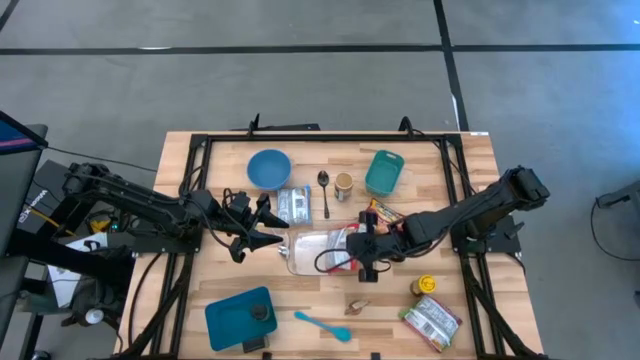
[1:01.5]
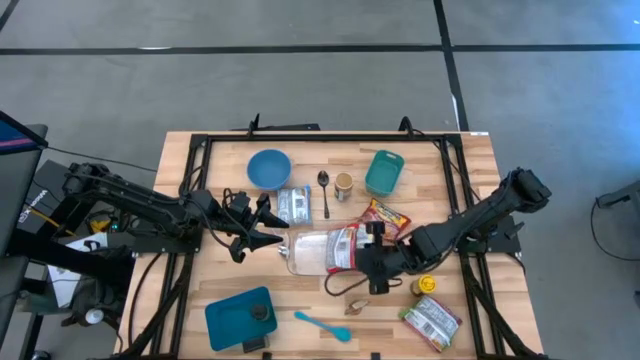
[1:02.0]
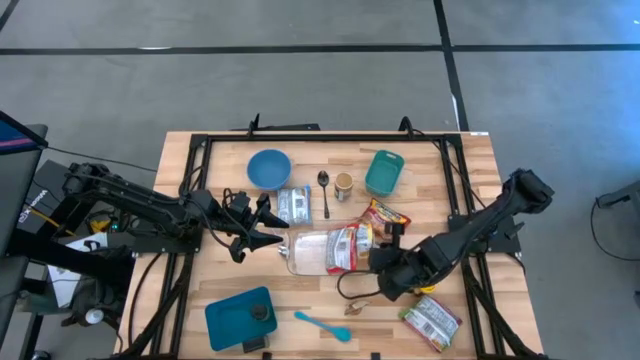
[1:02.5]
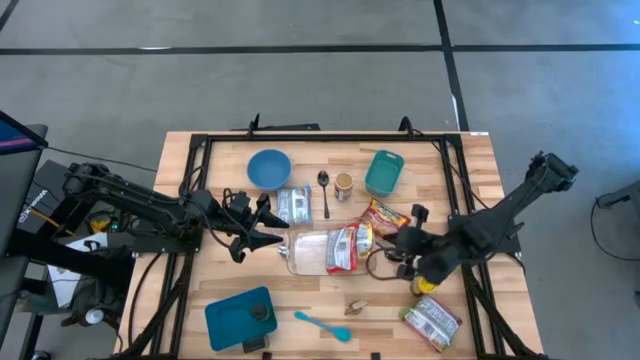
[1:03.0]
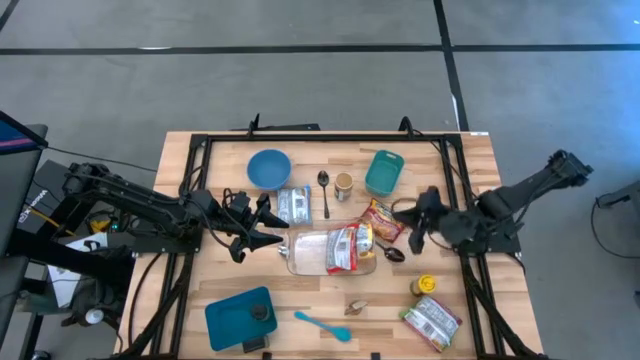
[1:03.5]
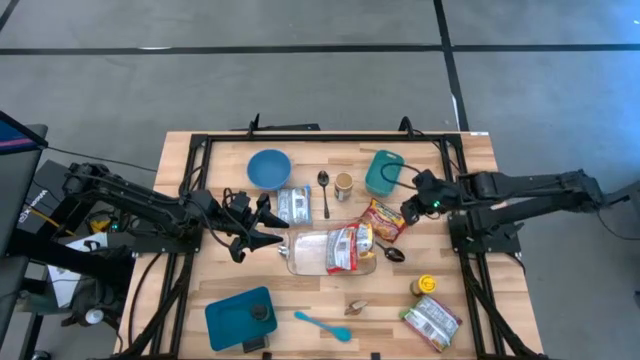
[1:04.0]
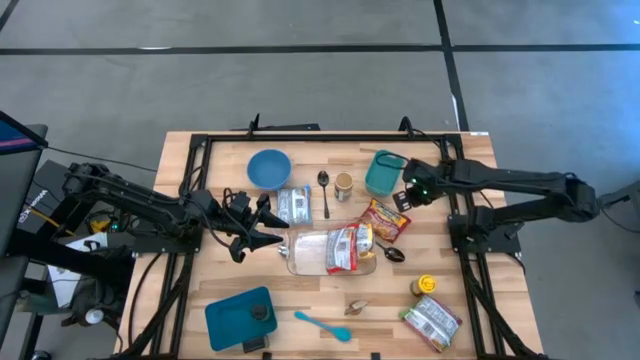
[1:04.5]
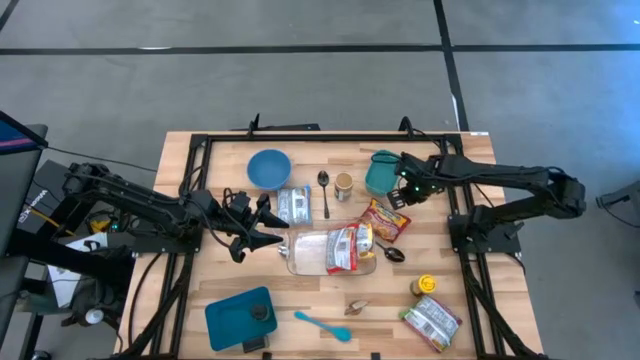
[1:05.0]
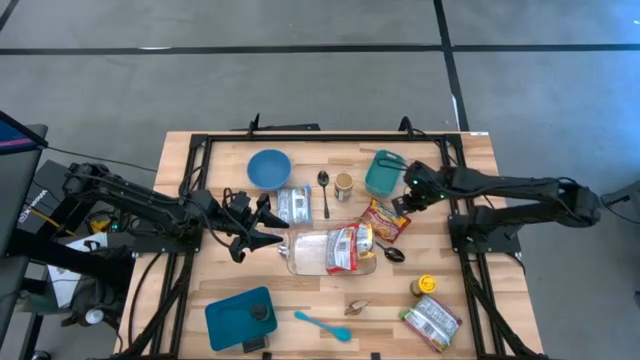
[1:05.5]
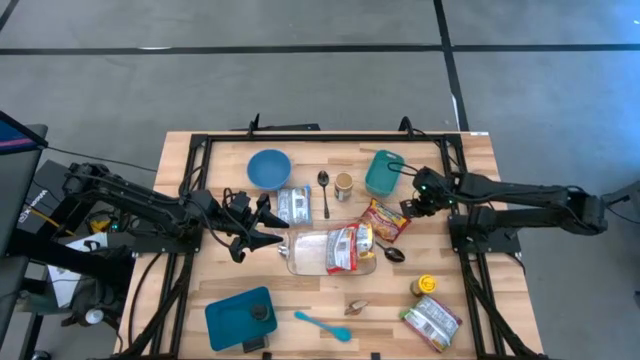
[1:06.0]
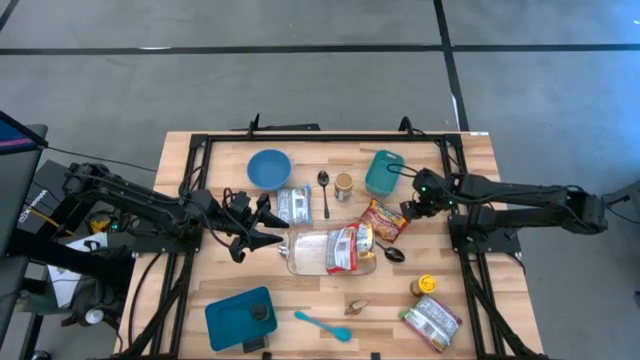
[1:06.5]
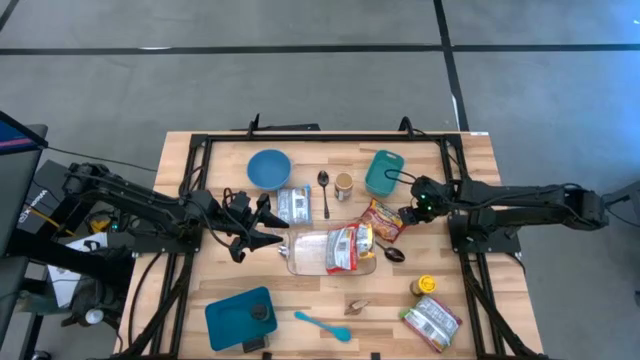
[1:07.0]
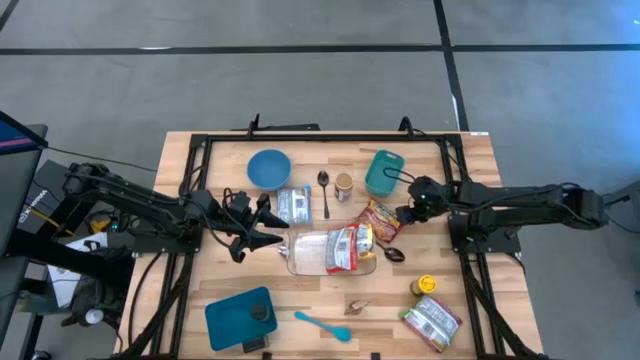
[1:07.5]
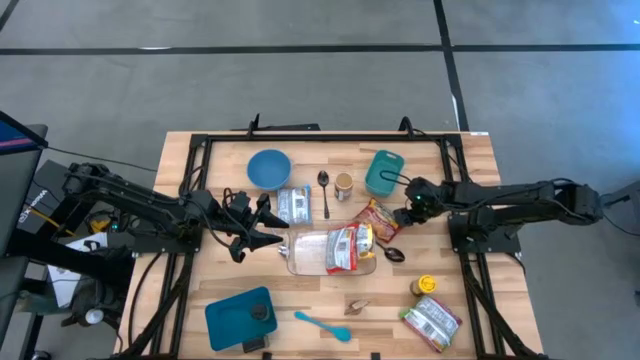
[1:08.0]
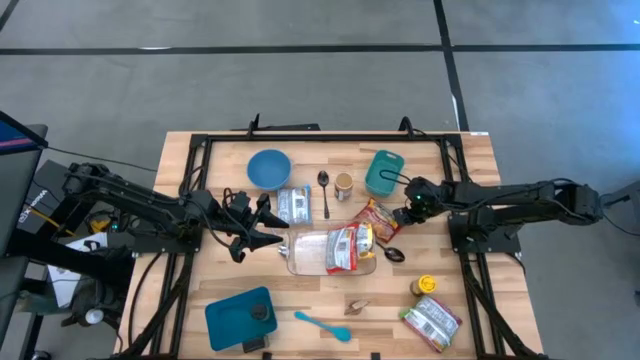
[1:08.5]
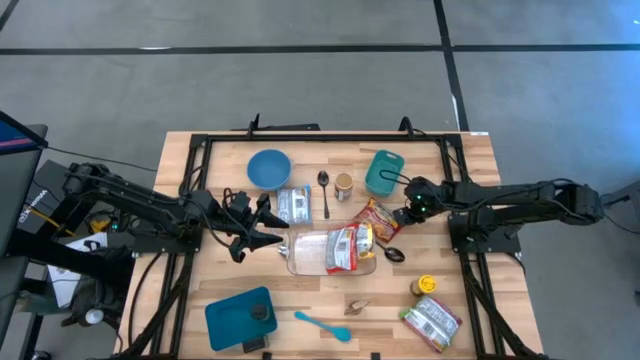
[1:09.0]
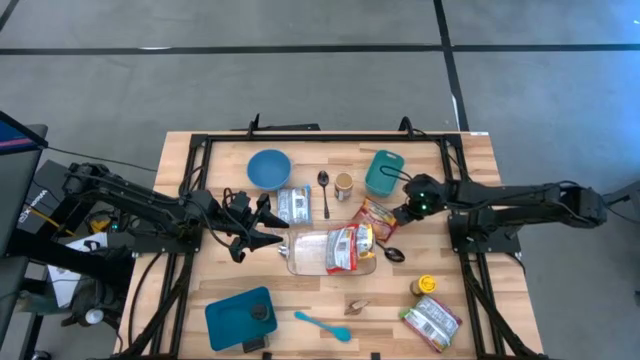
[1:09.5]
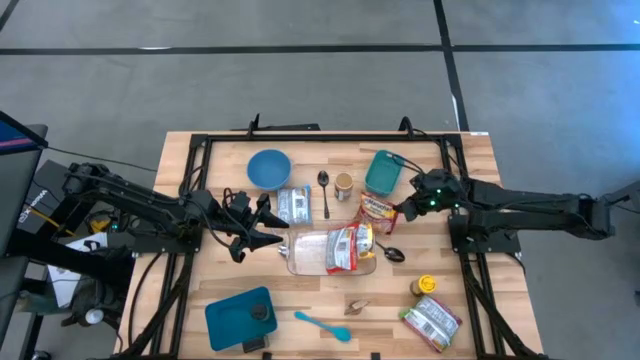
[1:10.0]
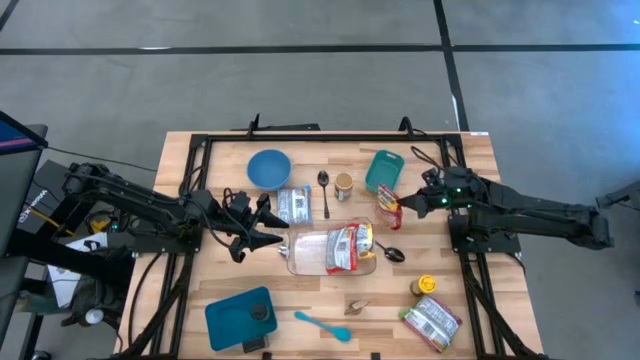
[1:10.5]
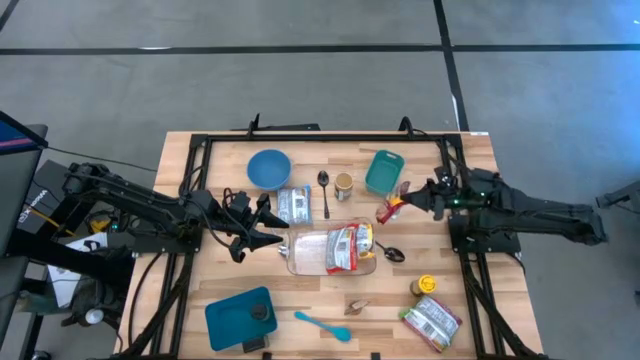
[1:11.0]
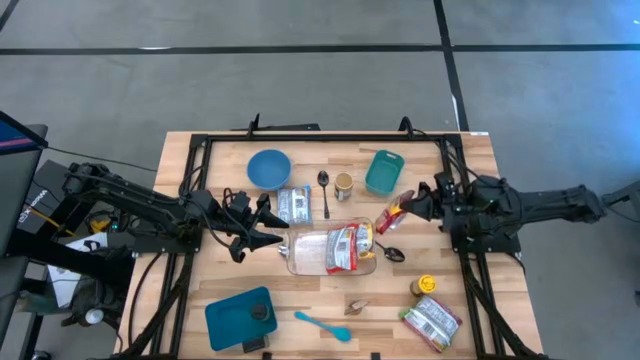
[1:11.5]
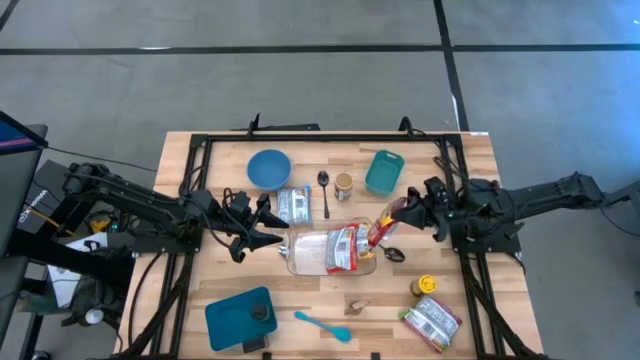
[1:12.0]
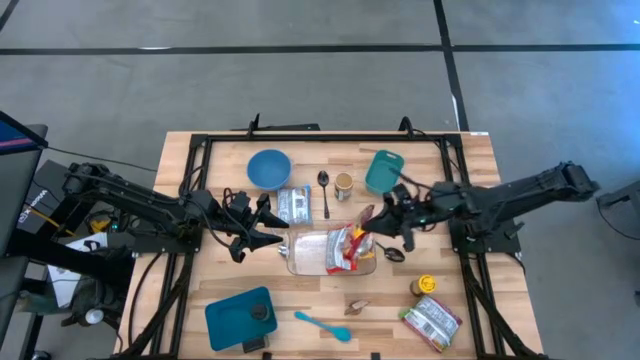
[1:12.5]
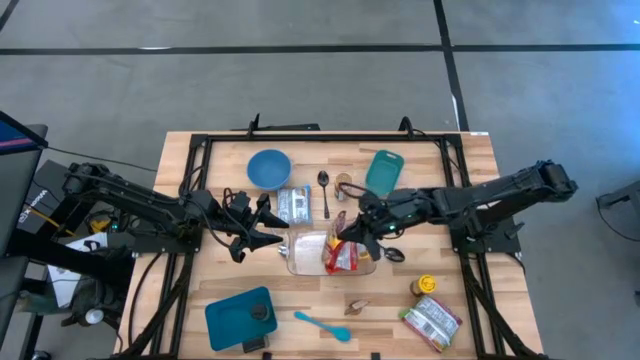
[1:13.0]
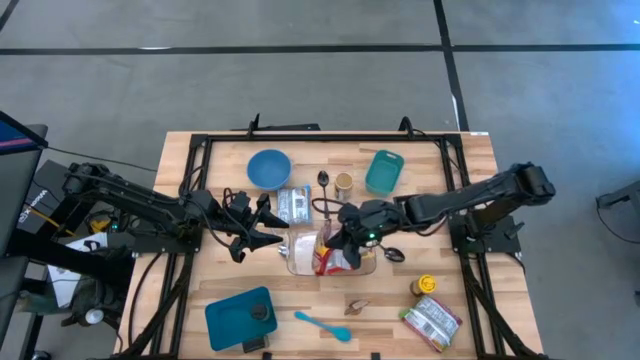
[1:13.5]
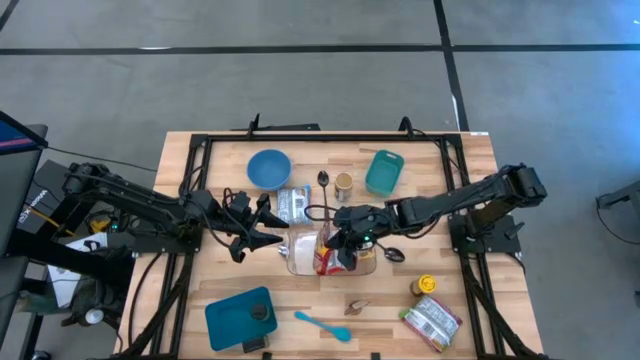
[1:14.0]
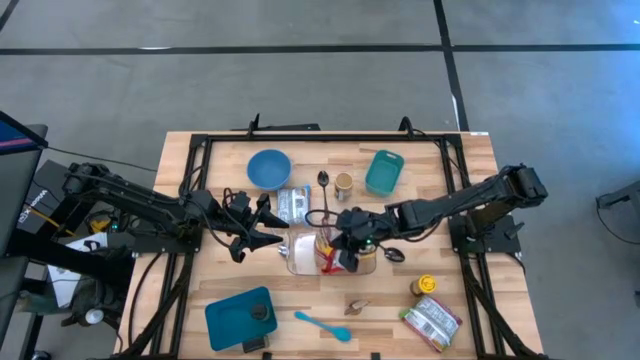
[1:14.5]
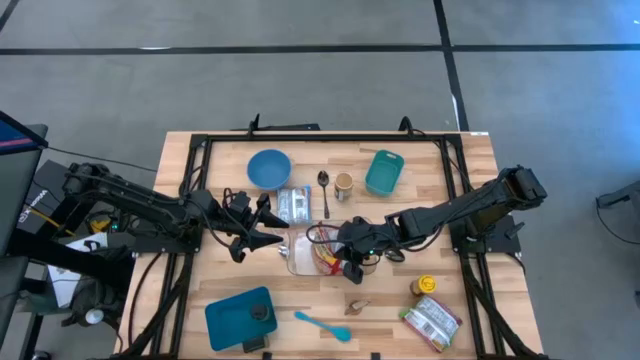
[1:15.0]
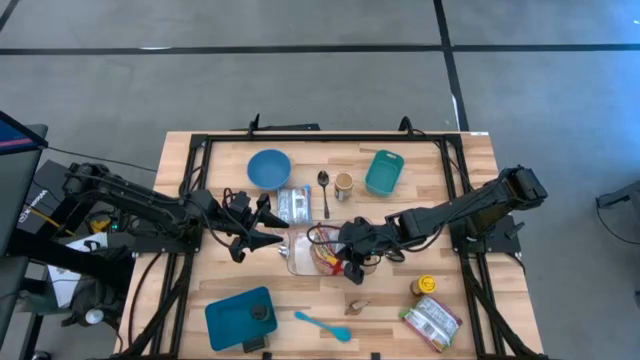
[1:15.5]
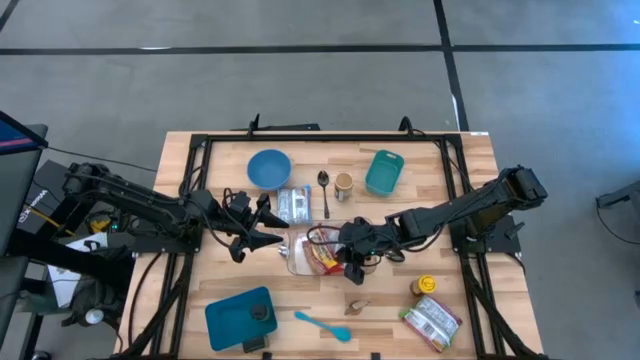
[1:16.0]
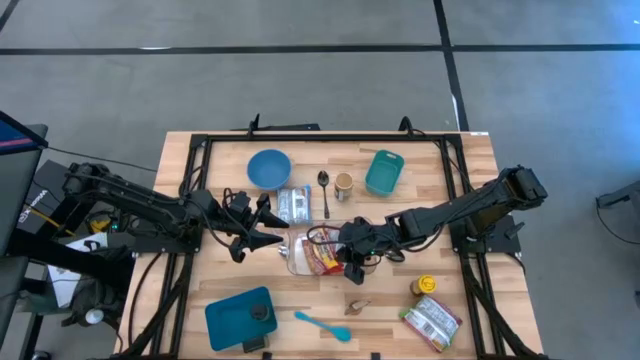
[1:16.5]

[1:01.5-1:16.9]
Task: Pick & Place Food Item
Put the red noodle pack into the transparent bin

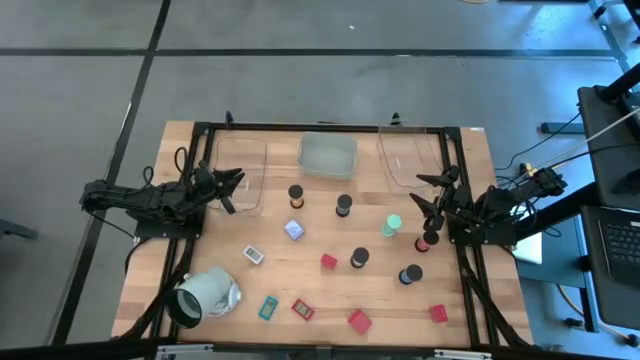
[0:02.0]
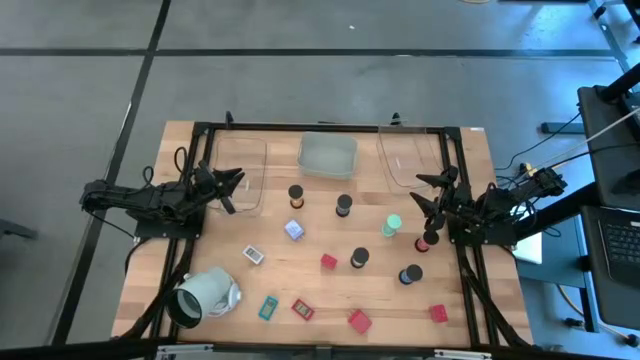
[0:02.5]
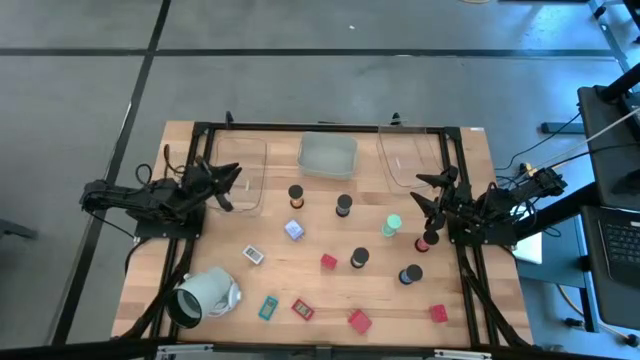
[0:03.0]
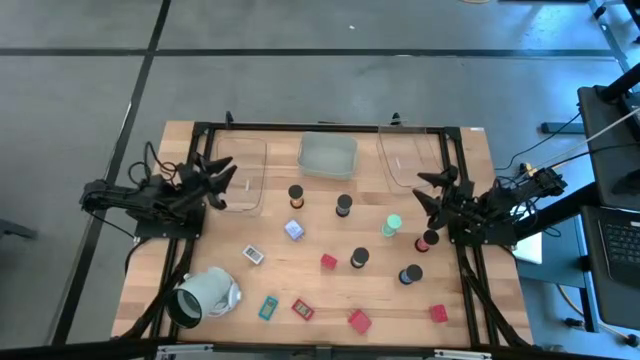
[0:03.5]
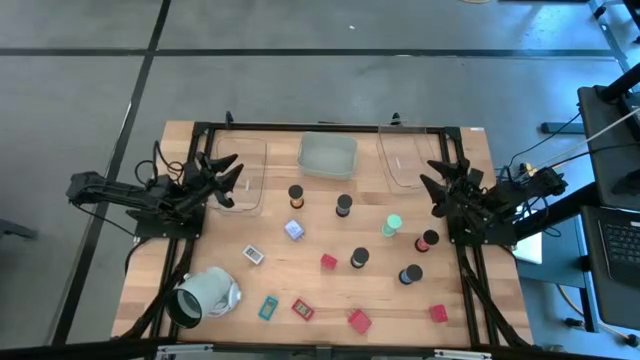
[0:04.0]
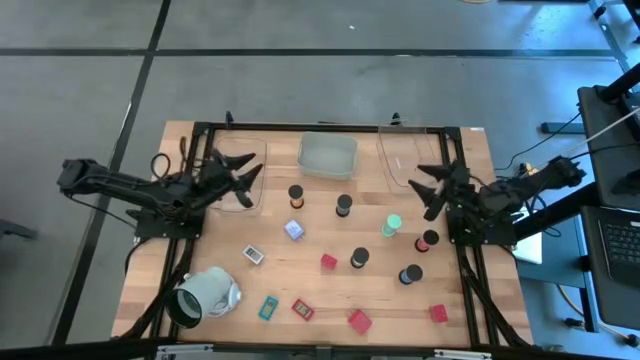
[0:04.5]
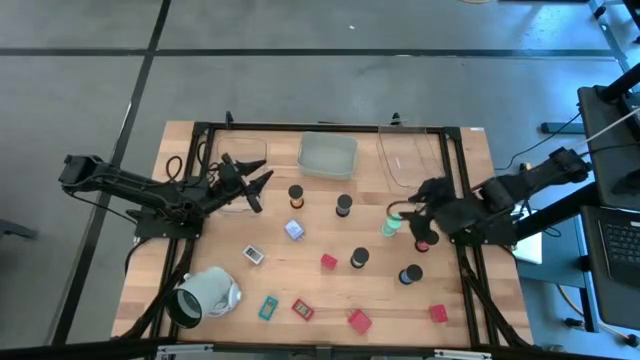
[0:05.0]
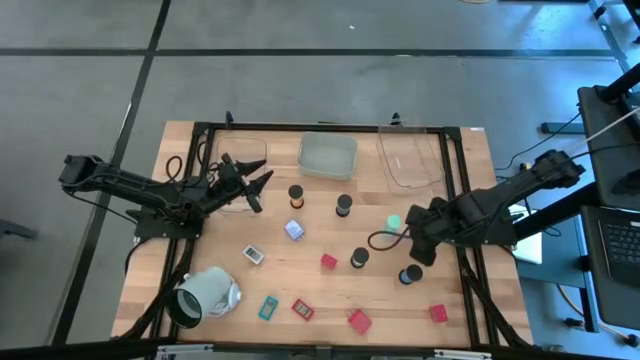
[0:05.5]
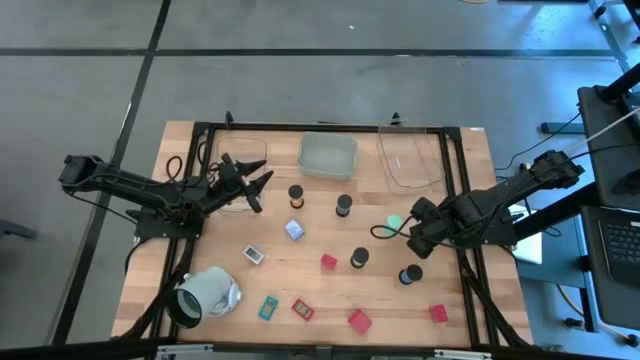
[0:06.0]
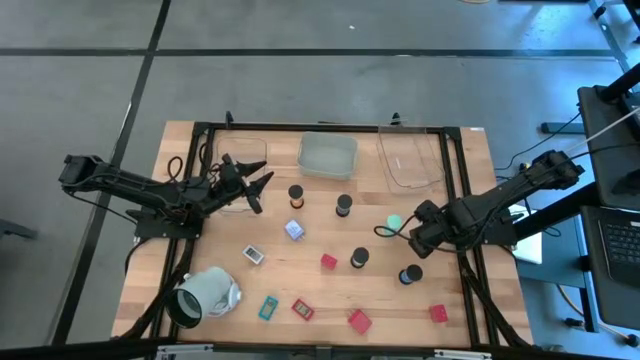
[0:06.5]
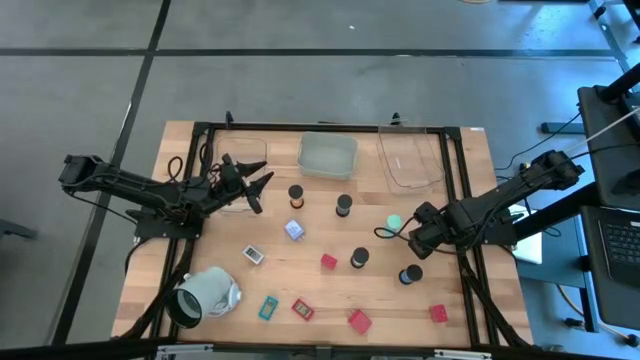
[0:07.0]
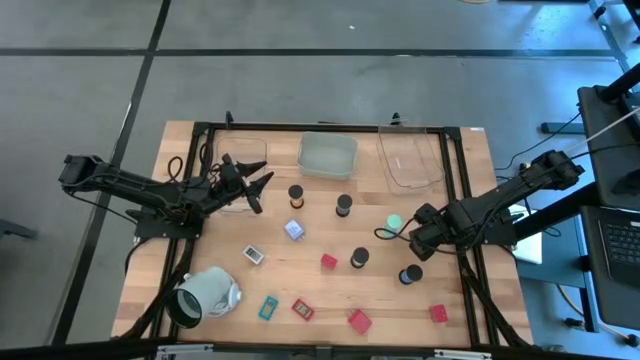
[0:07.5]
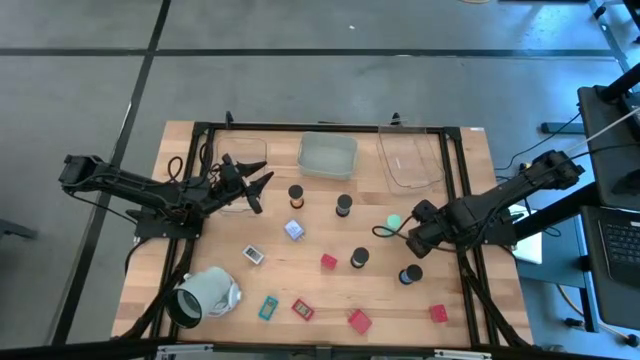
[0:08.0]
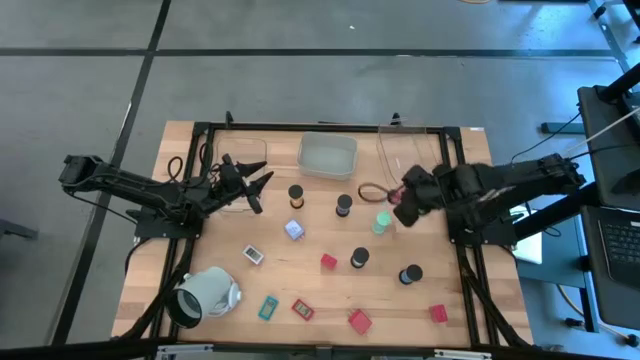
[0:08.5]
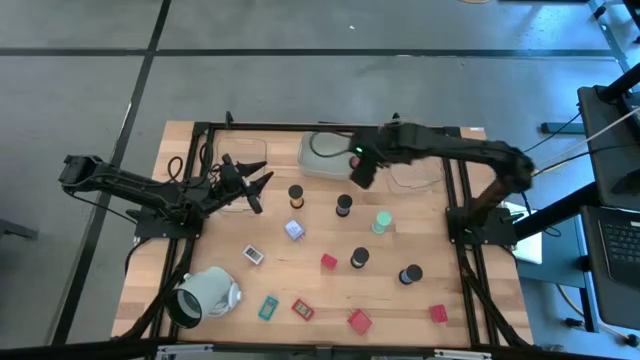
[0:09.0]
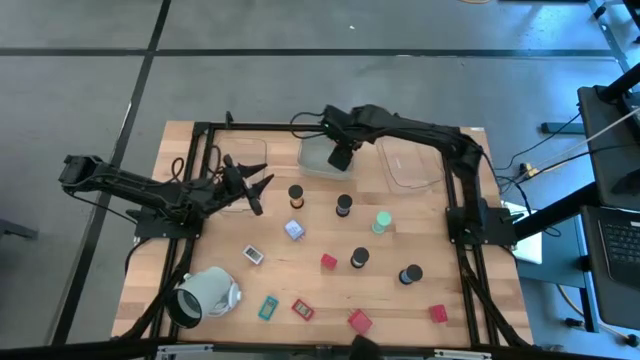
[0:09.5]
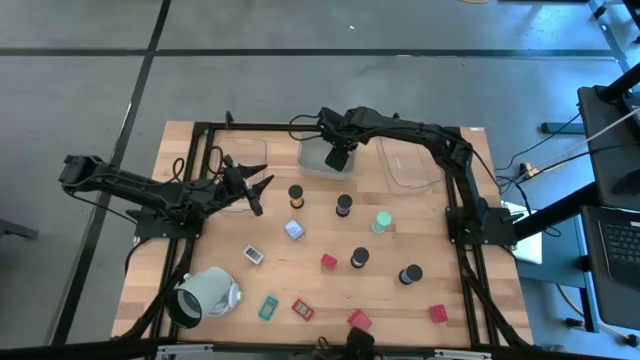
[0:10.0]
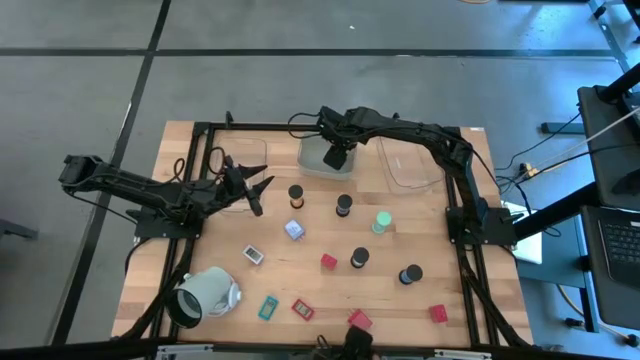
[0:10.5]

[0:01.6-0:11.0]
Task: Pick & Place Office items
Put the red hourglass timer into the gray bin
